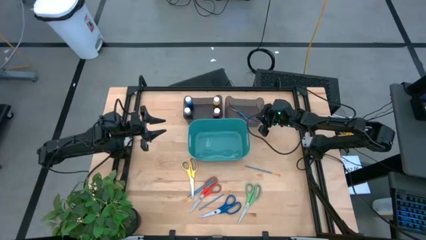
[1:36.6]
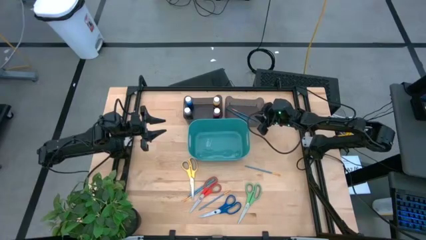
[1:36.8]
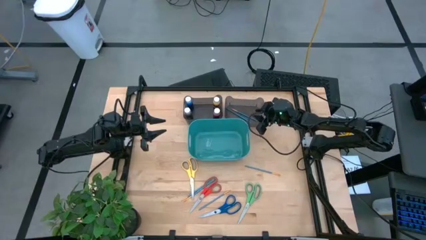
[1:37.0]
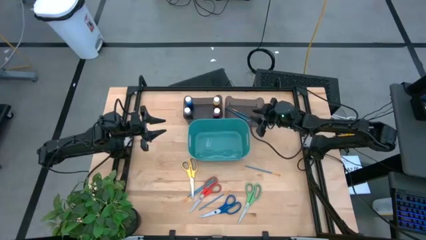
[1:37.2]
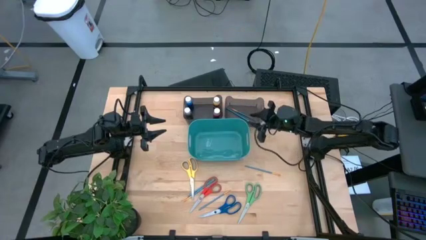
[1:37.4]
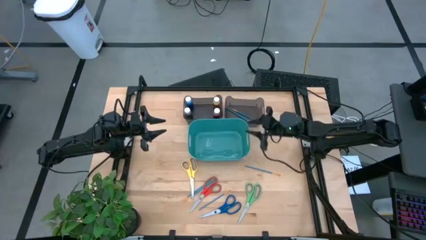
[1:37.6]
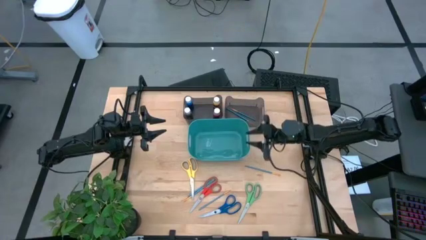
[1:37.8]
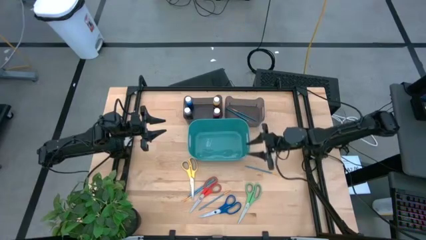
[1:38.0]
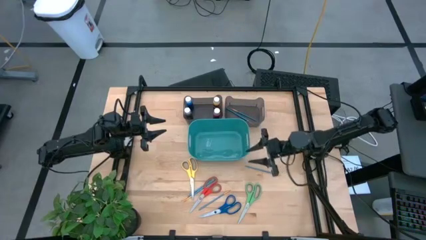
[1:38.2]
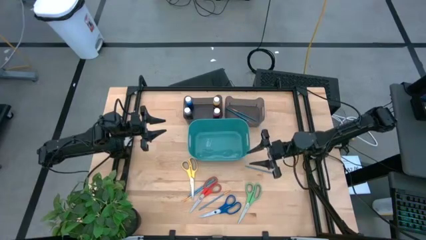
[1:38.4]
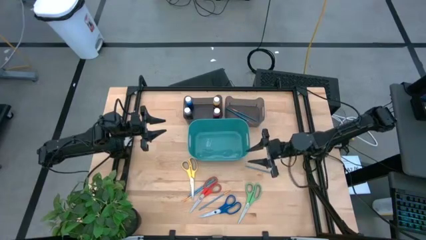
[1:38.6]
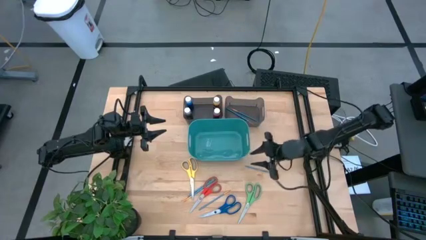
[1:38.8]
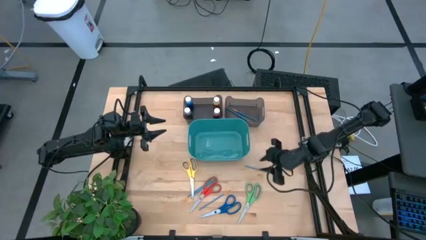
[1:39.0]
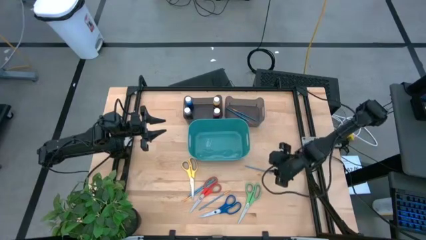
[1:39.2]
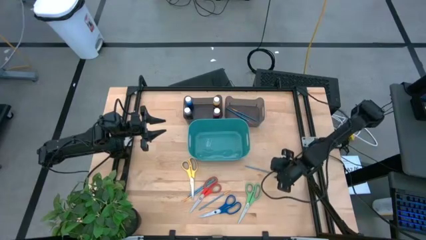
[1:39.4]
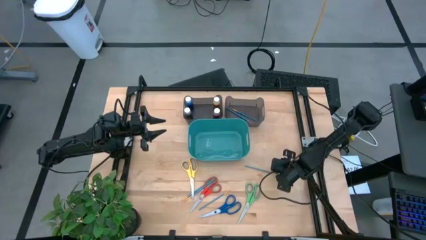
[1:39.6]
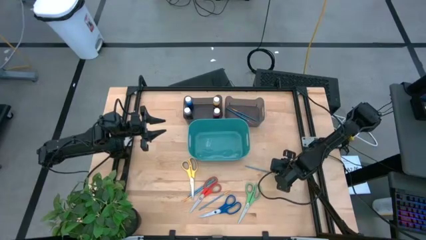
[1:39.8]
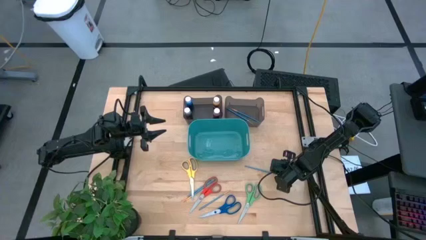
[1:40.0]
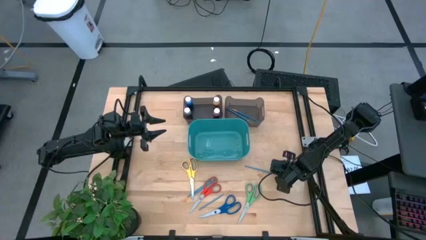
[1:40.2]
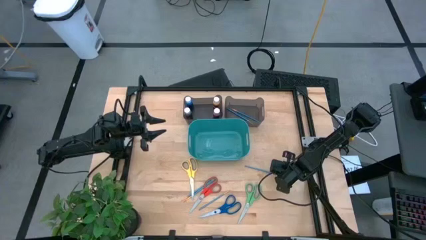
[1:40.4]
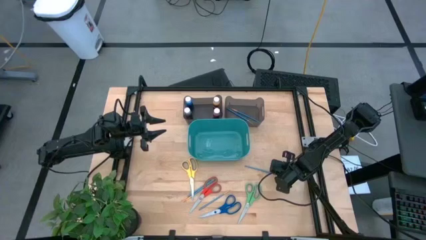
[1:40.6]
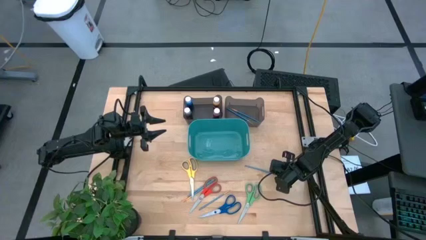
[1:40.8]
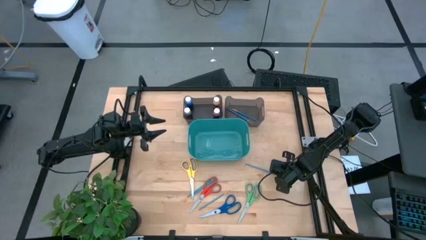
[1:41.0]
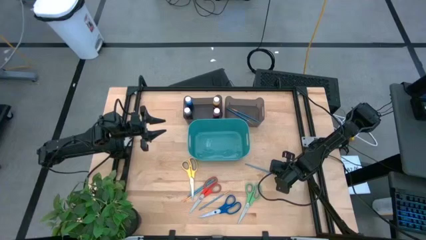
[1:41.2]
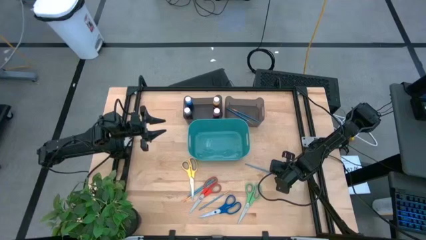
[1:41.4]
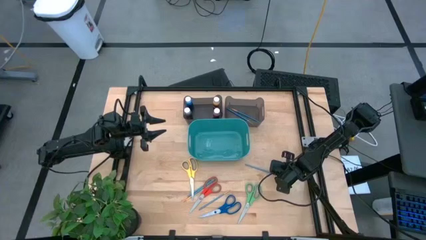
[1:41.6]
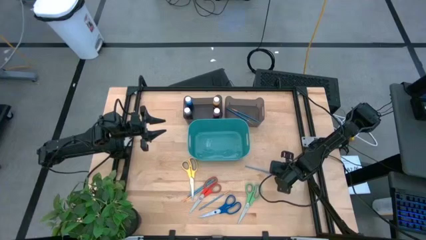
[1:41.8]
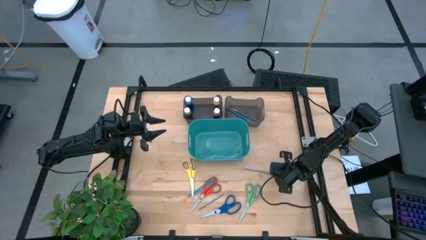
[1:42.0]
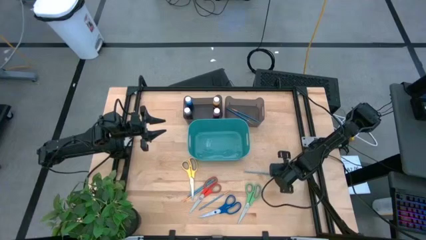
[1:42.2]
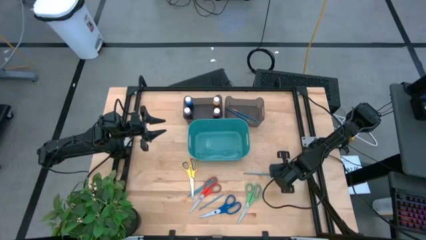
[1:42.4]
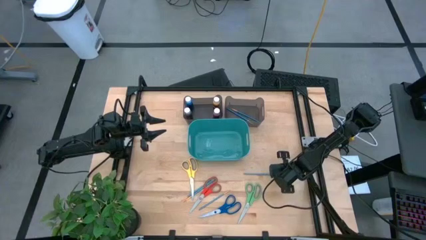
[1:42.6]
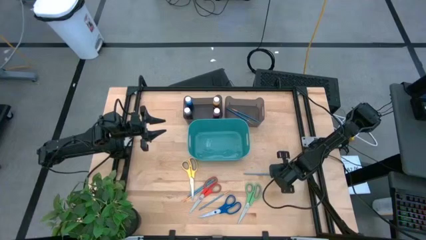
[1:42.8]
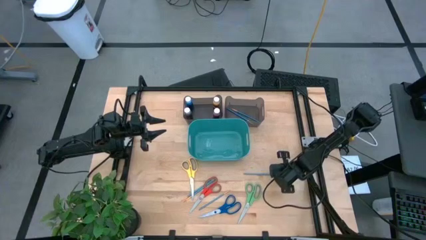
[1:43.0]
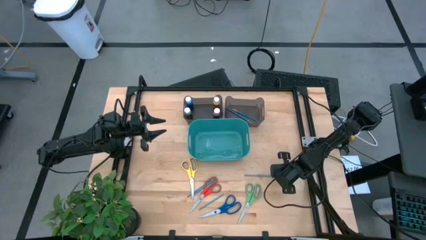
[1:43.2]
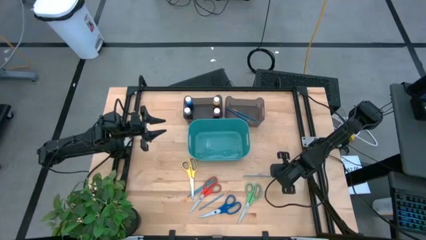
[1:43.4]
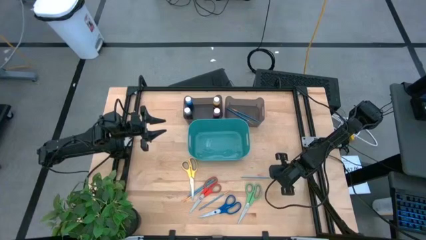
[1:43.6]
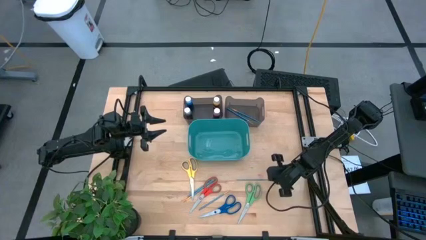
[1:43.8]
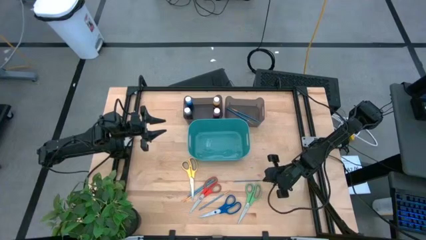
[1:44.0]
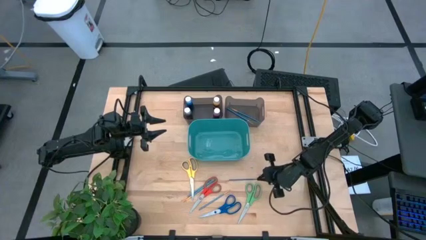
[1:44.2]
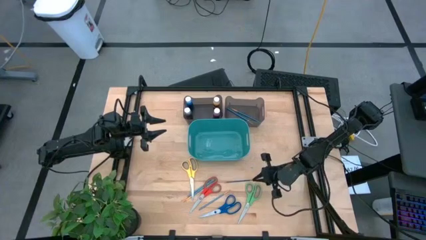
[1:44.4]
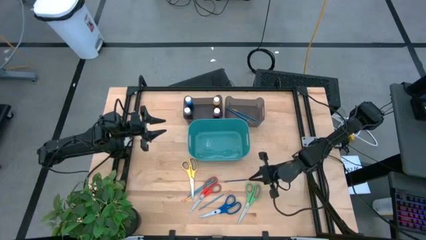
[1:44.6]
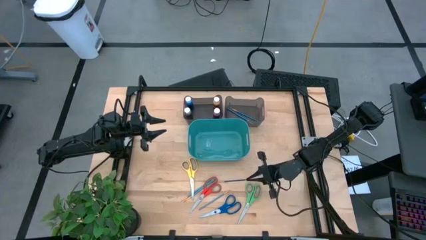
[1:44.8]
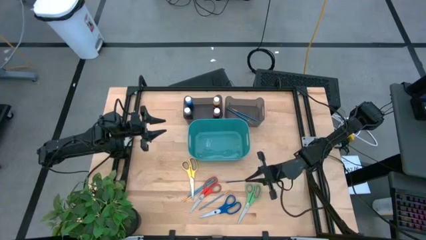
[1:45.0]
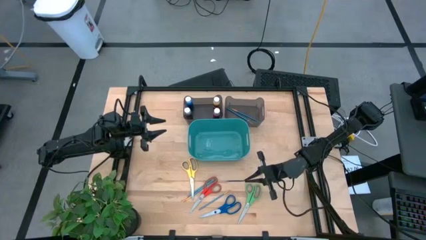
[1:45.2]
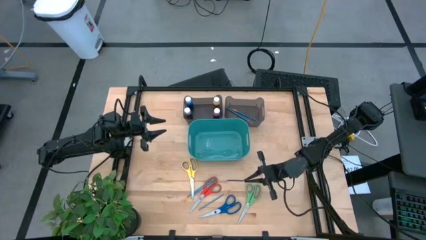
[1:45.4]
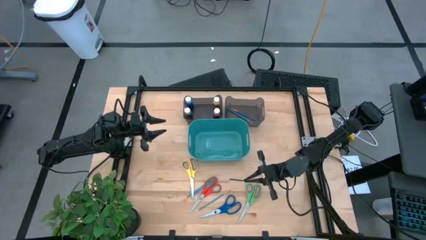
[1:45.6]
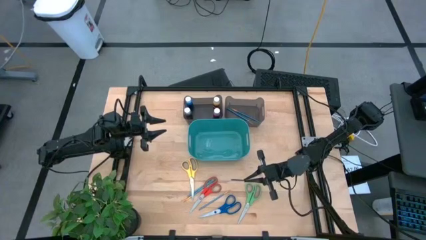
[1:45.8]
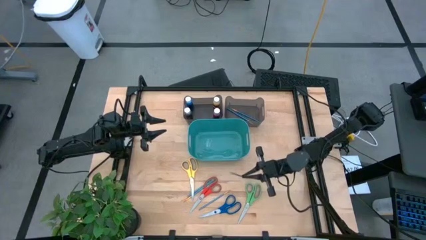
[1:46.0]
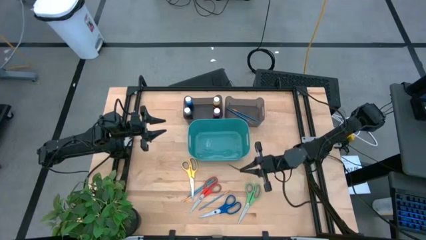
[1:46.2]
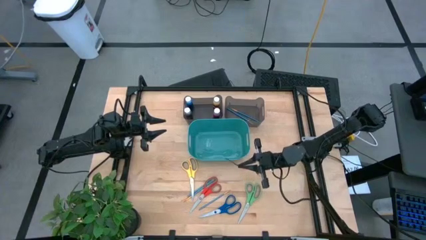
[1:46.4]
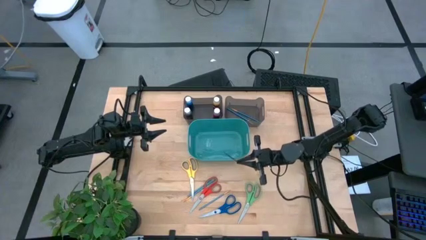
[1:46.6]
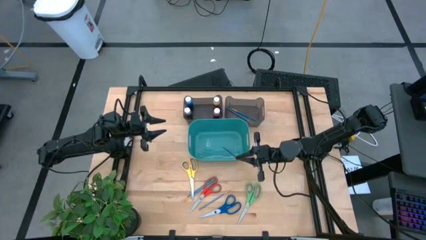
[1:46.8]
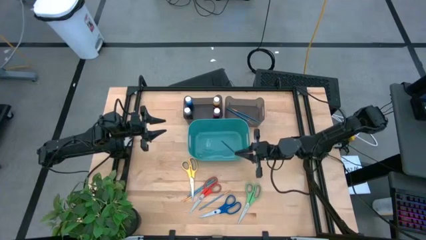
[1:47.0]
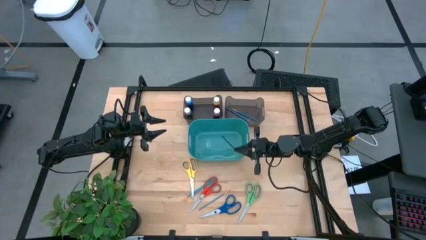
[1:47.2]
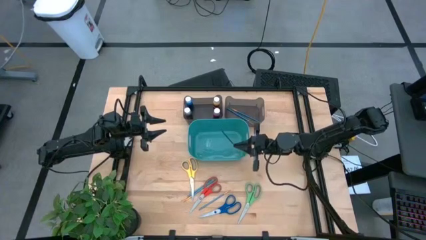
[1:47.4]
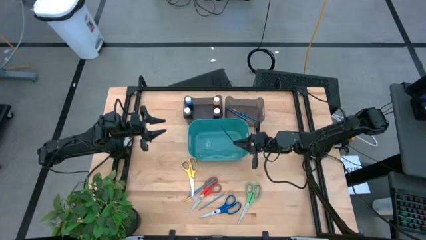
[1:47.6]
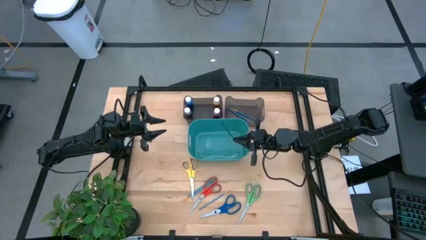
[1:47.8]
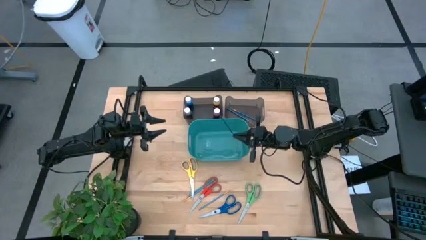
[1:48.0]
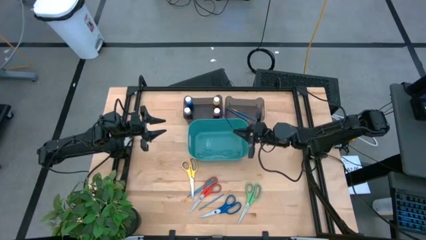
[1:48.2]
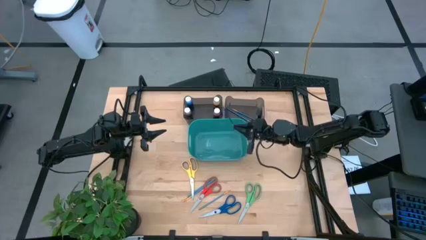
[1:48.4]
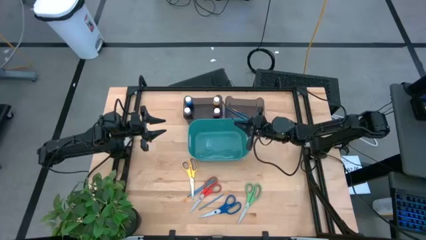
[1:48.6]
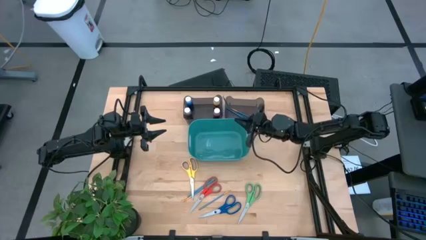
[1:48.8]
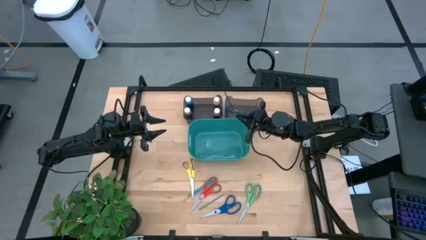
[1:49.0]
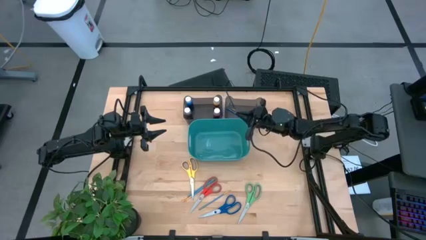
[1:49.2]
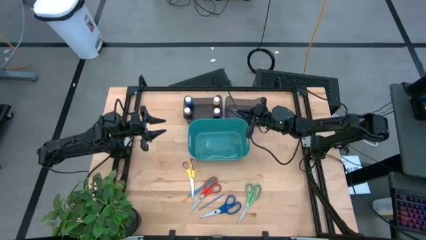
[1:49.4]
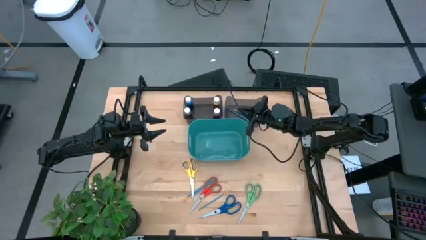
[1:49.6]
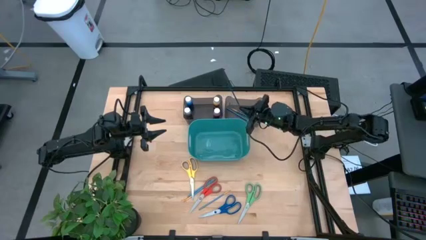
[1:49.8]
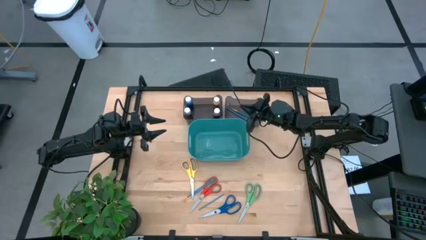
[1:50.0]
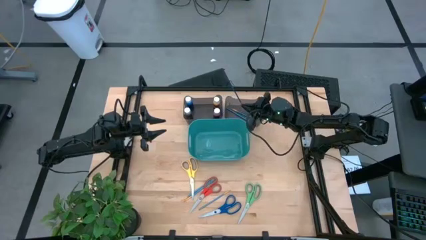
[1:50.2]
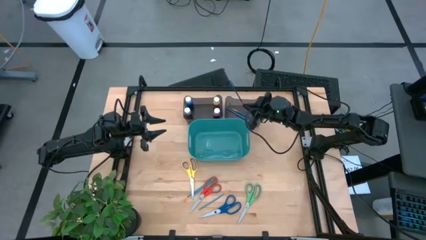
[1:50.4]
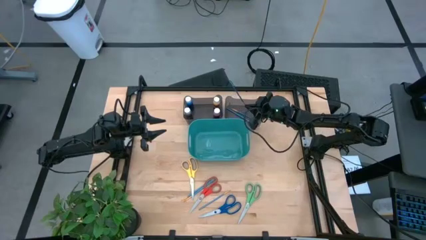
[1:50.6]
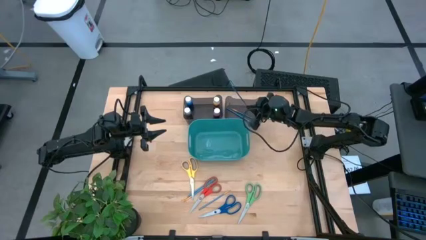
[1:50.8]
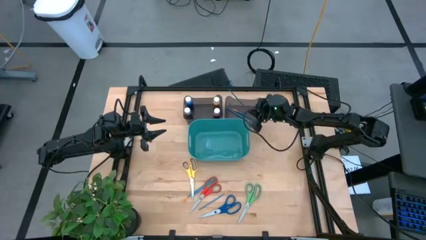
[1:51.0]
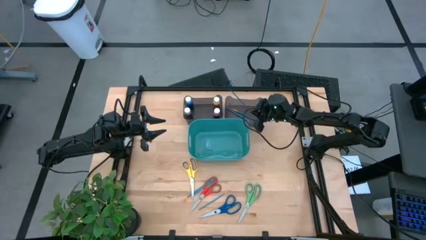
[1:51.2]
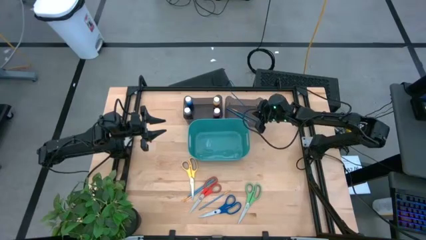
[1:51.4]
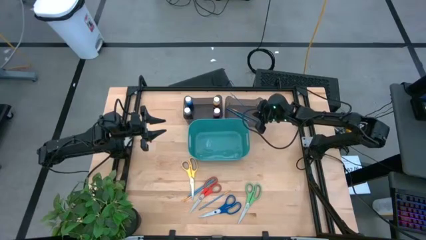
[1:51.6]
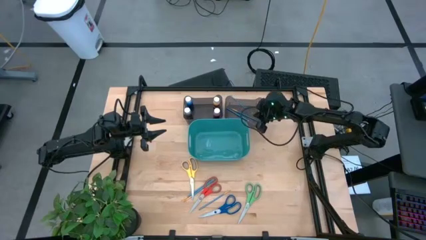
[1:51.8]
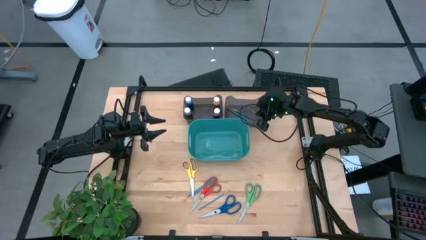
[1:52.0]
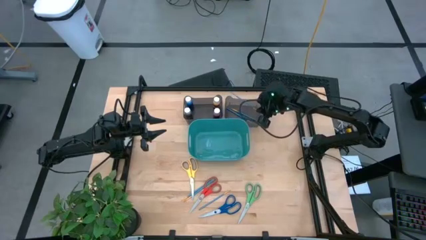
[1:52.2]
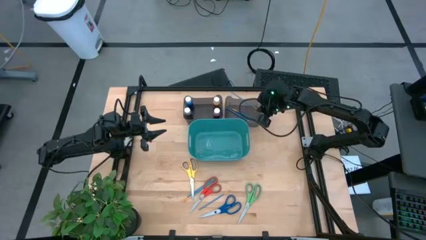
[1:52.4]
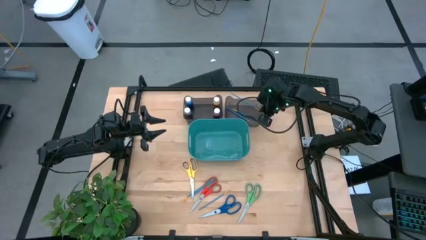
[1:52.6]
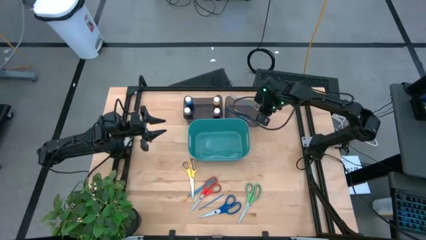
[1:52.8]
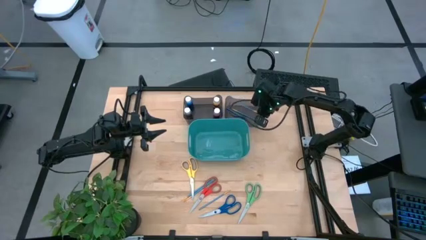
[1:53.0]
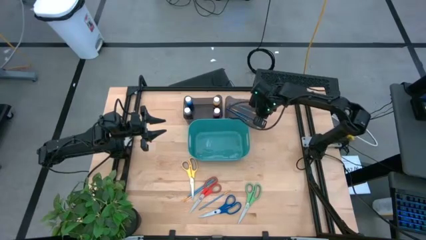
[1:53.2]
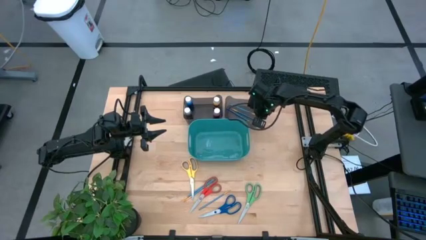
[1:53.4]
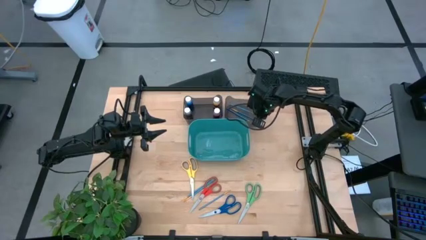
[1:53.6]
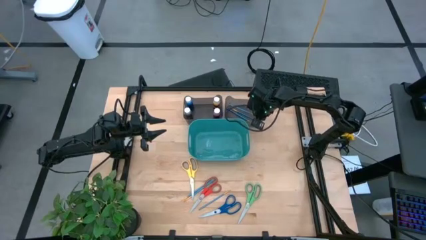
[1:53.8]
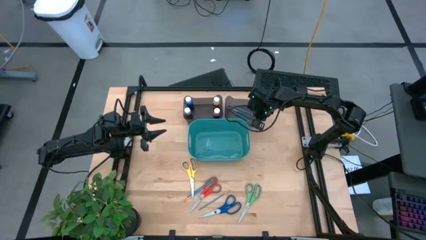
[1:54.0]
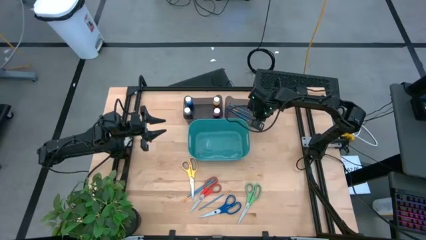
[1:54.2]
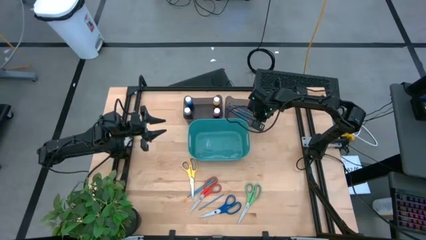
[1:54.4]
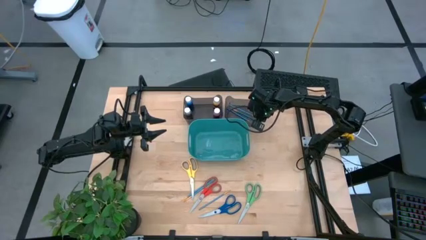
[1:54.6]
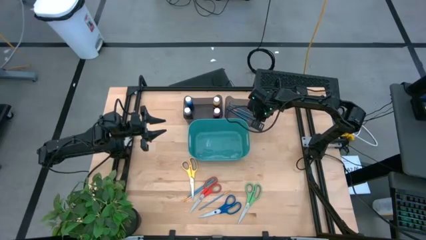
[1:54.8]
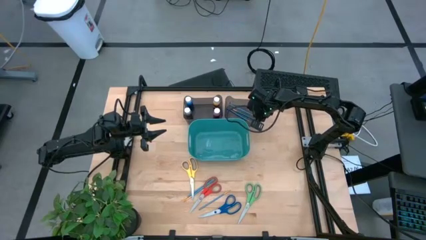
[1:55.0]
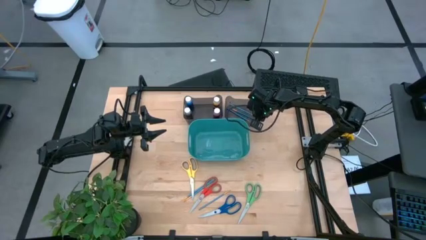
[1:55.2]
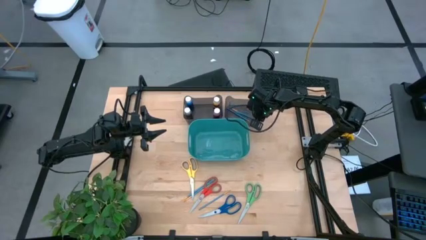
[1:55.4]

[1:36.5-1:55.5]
Task: Pick & Place Paint Supplies
Put the blue paint brush into the right black bin
